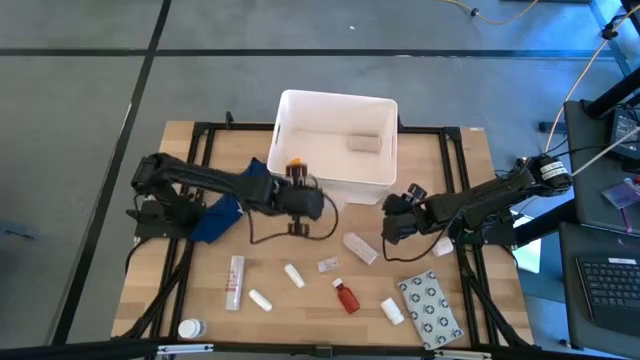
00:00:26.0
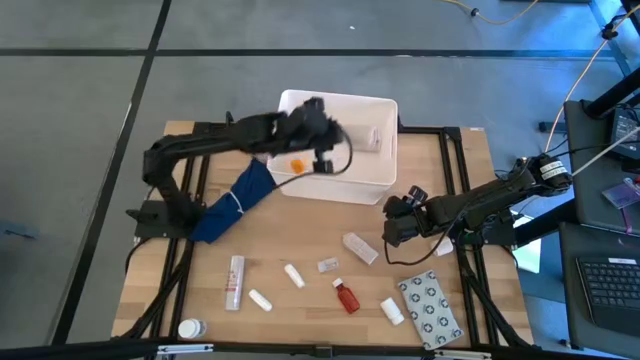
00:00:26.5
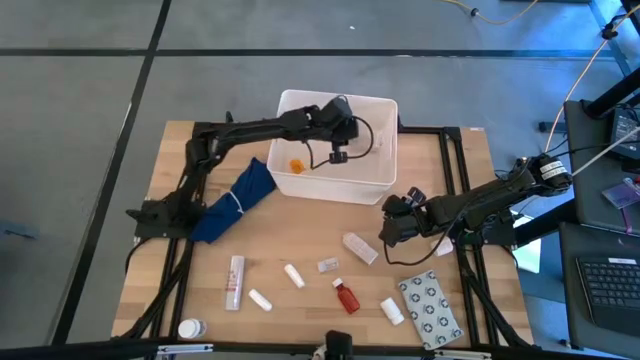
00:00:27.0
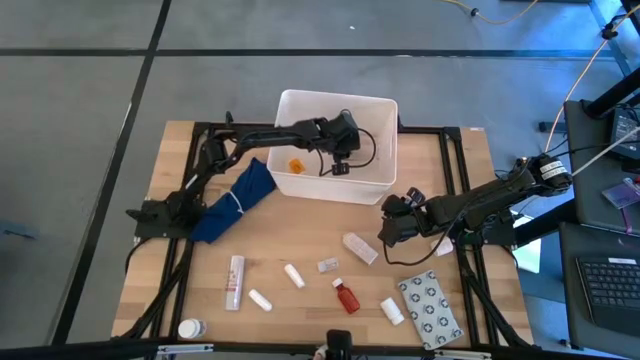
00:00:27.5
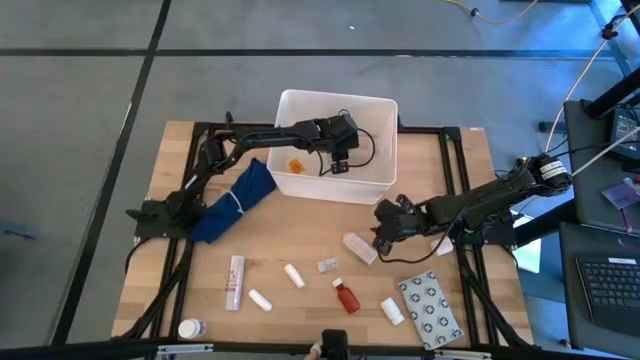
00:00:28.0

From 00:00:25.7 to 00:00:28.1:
Task: Pick & place medical supplies in basket/bin
Put the light brown bandage into the white bin

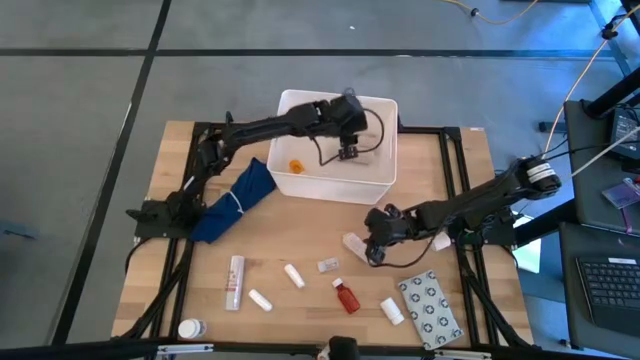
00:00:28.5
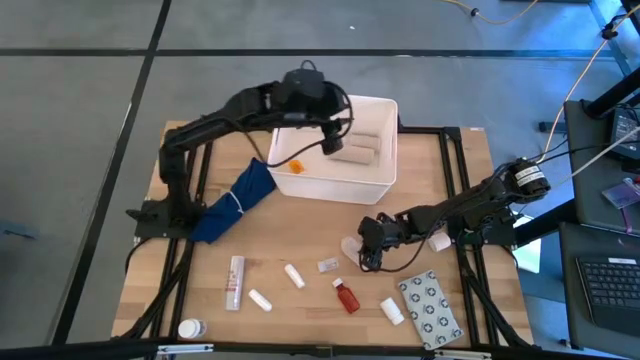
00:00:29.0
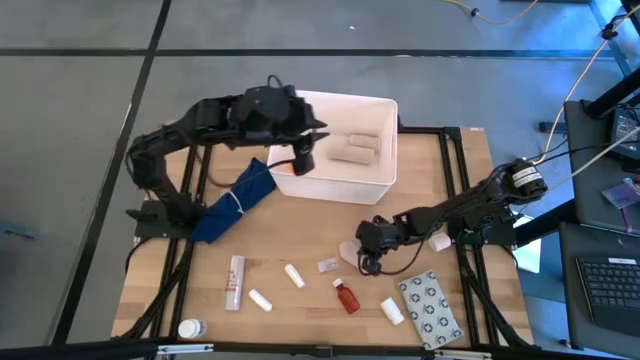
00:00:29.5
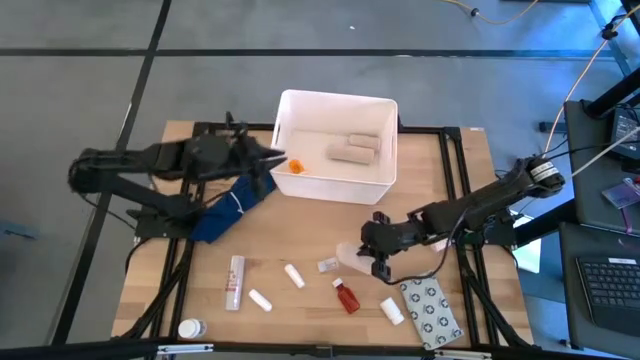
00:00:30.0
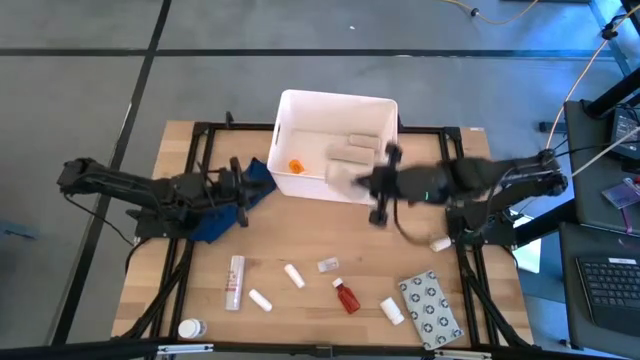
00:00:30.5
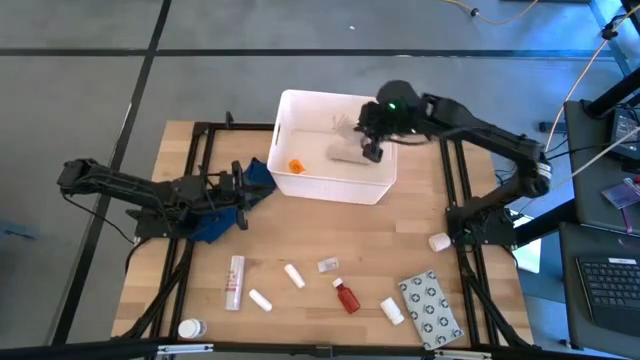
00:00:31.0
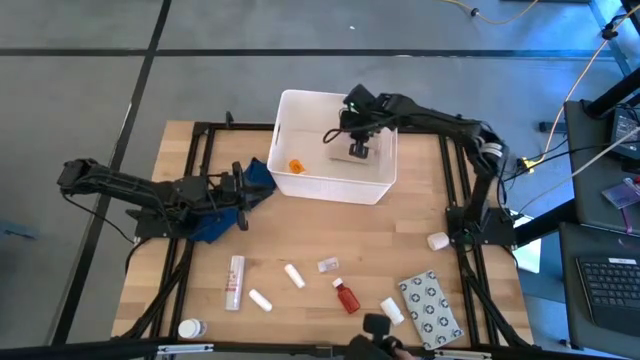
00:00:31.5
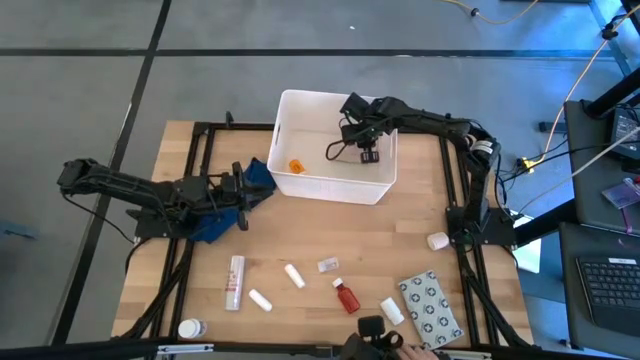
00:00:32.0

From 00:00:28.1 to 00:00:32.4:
Put the light brown bandage into the white bin

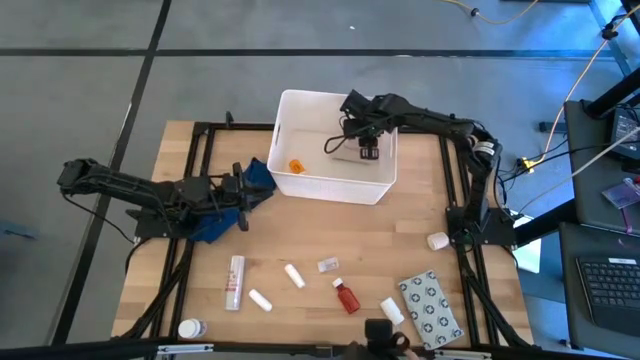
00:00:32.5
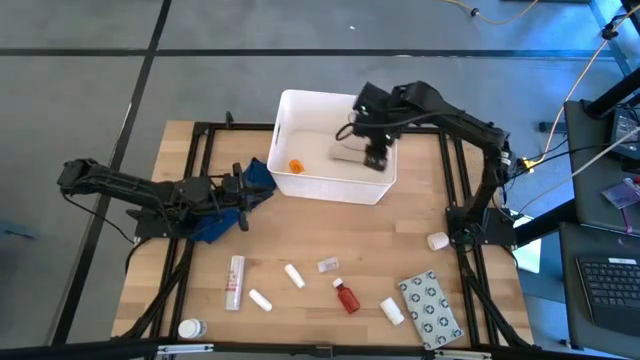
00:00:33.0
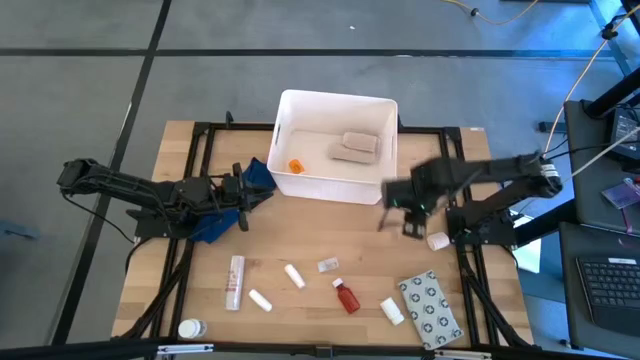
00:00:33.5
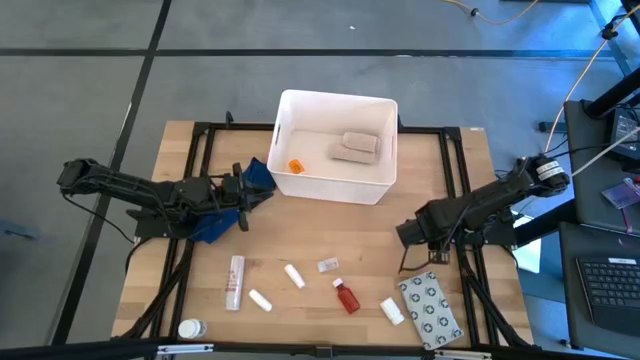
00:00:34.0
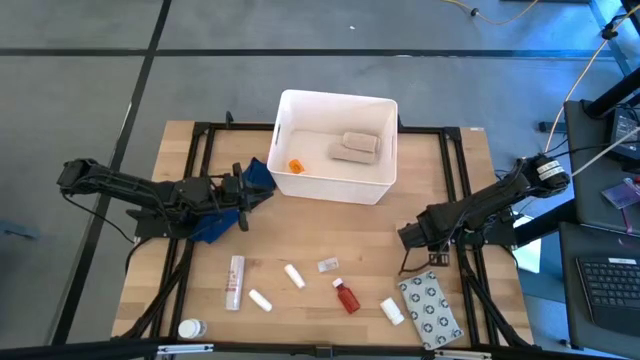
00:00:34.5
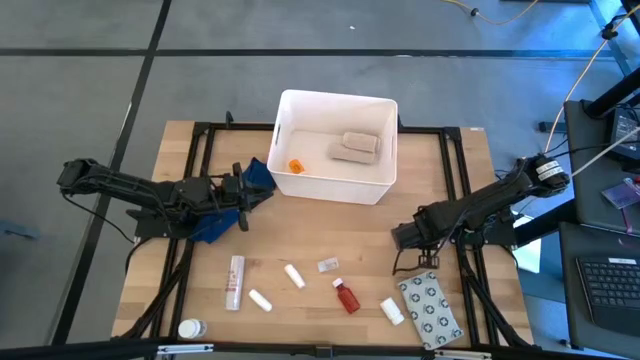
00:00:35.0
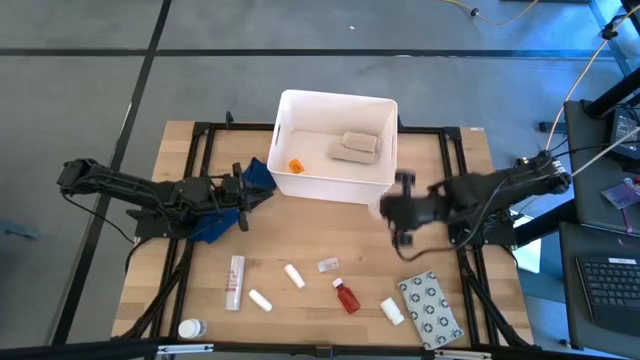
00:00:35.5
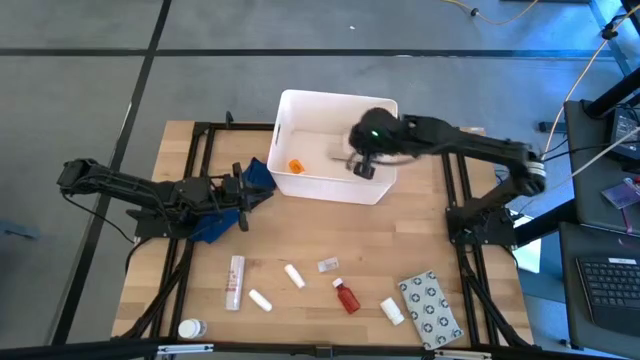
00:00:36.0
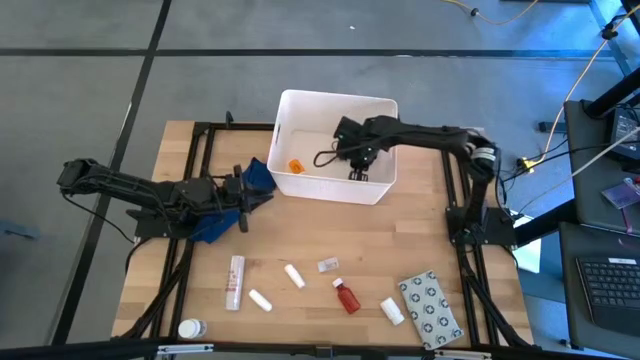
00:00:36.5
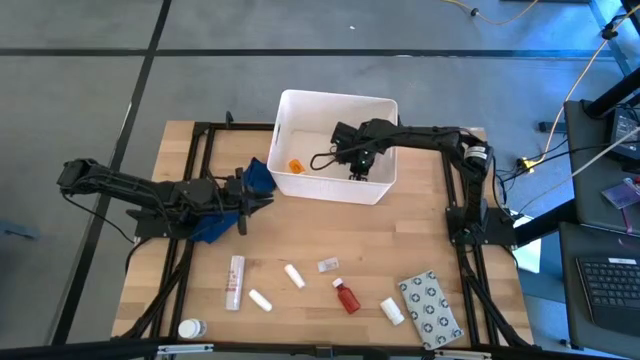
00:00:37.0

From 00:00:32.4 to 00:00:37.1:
Put the light brown bandage into the white bin

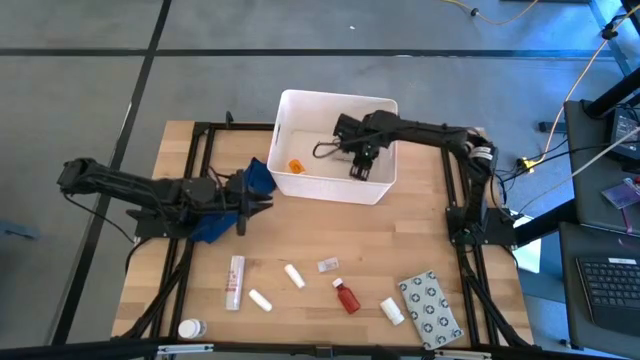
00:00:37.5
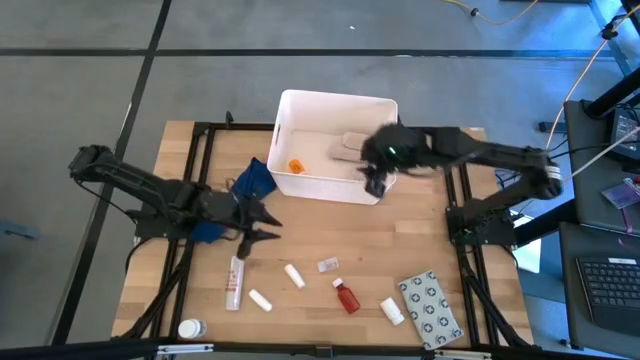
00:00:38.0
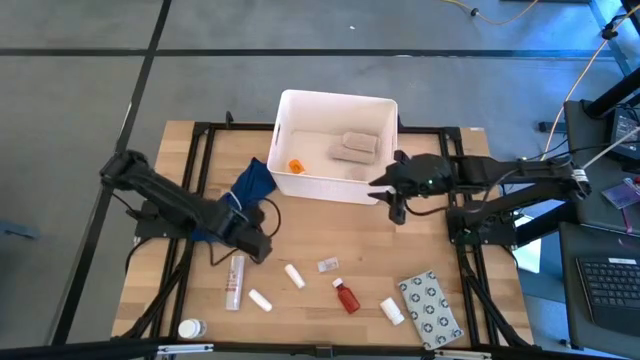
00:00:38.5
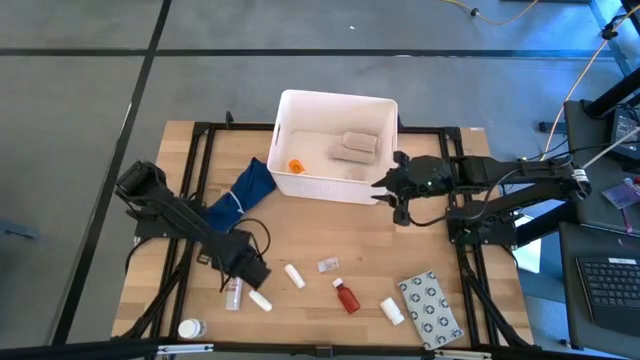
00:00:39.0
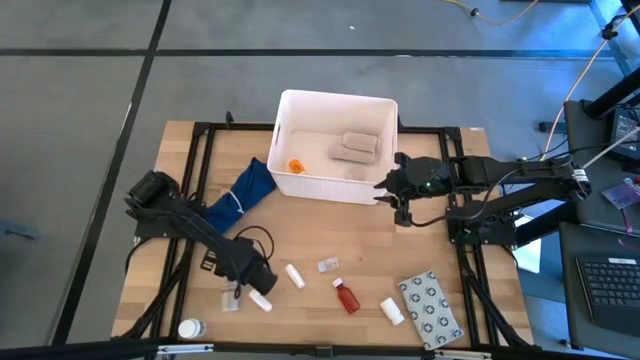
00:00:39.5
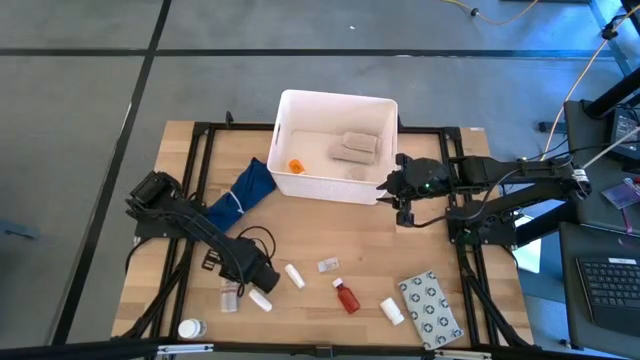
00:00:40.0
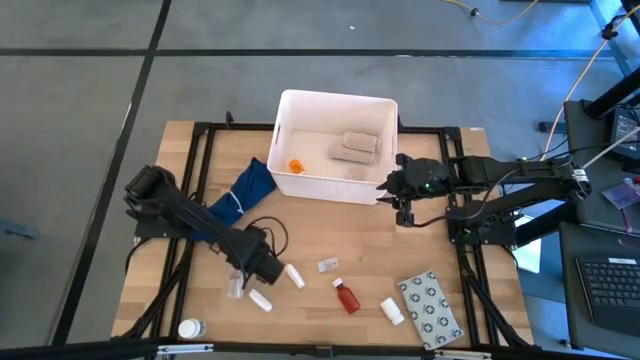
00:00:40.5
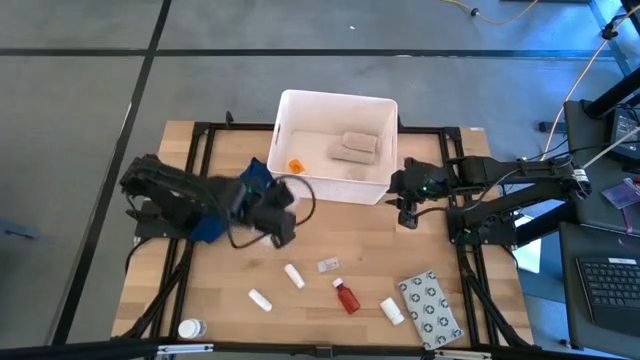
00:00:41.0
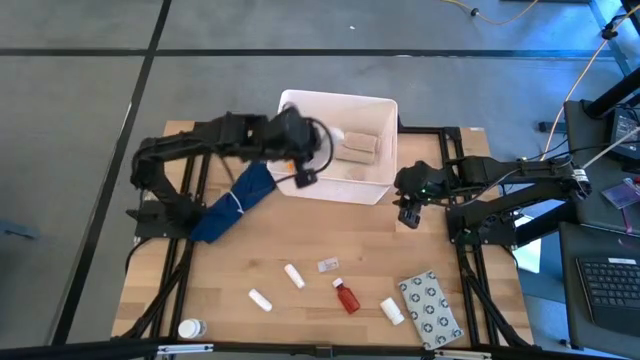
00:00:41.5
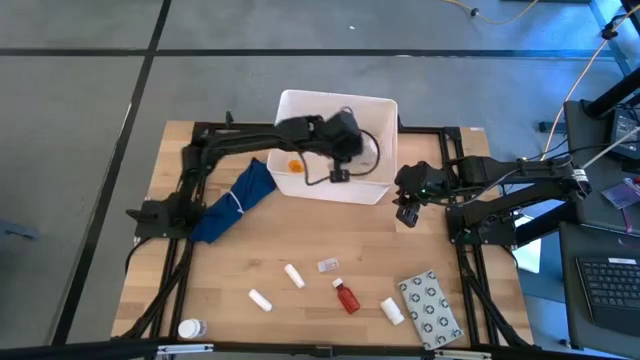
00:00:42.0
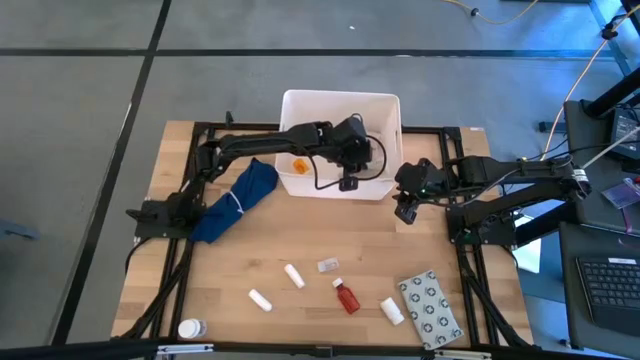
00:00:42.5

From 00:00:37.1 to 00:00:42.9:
Put the light brown bandage into the white bin

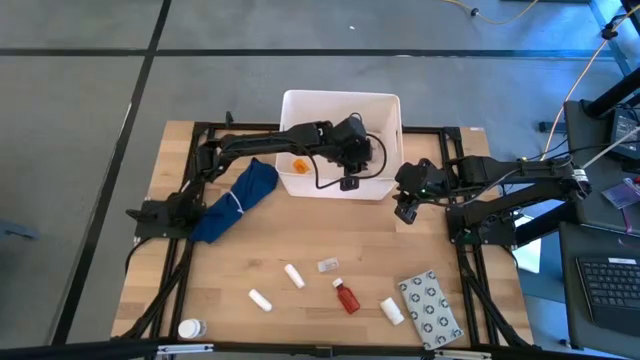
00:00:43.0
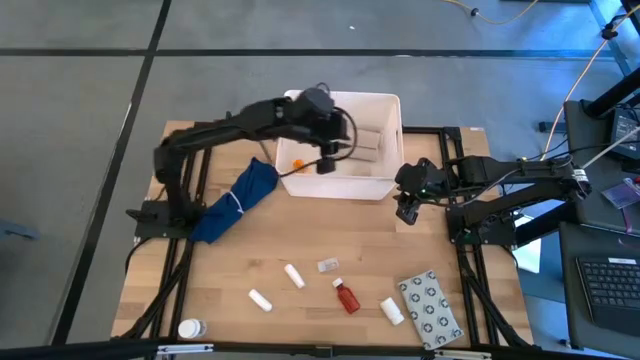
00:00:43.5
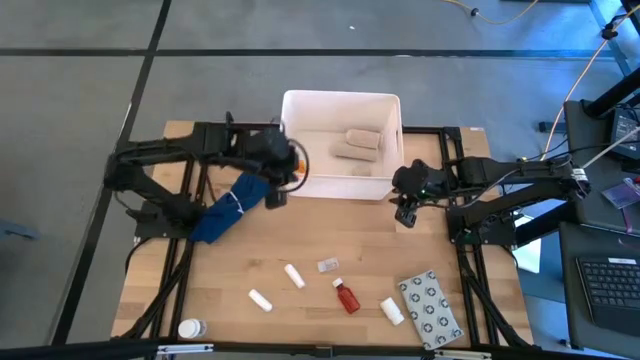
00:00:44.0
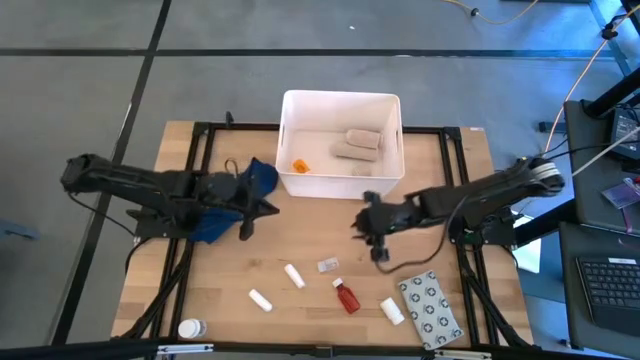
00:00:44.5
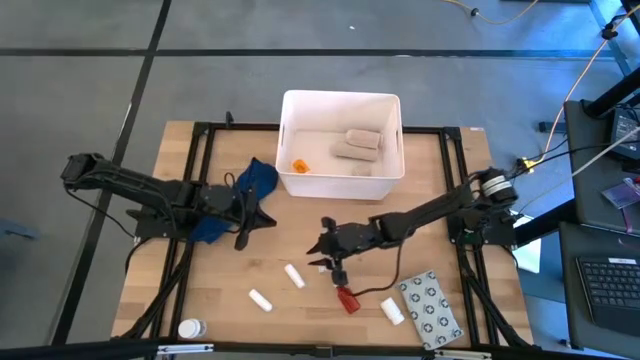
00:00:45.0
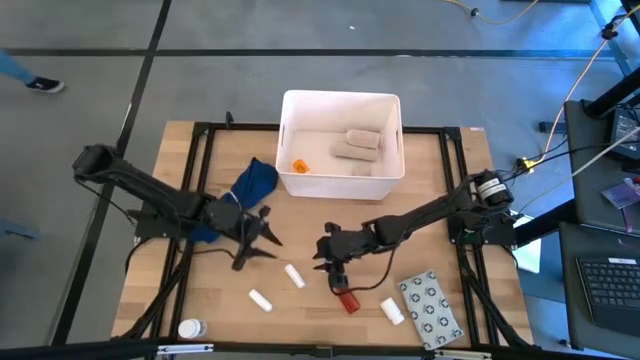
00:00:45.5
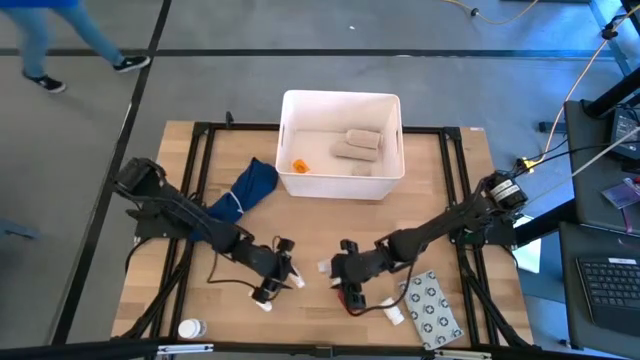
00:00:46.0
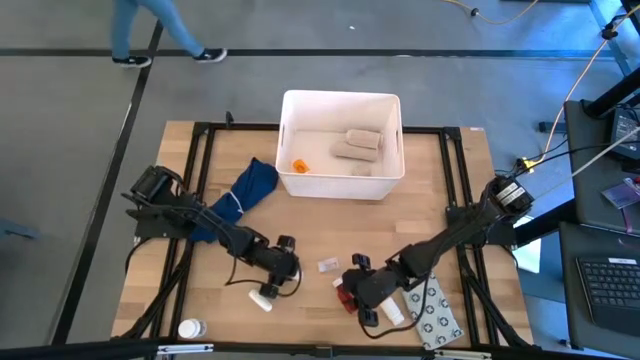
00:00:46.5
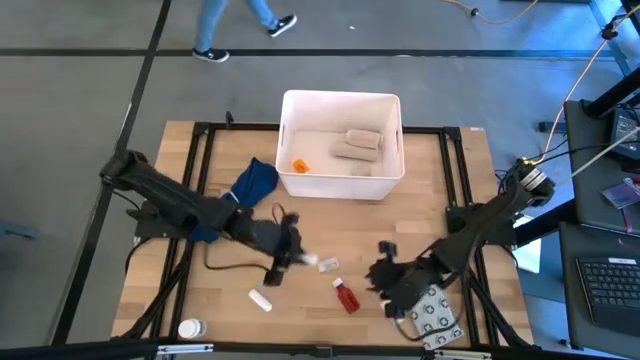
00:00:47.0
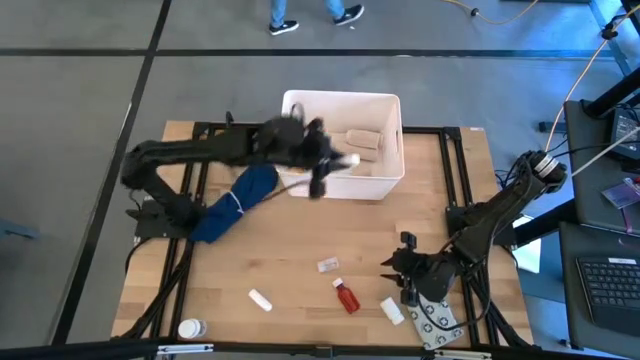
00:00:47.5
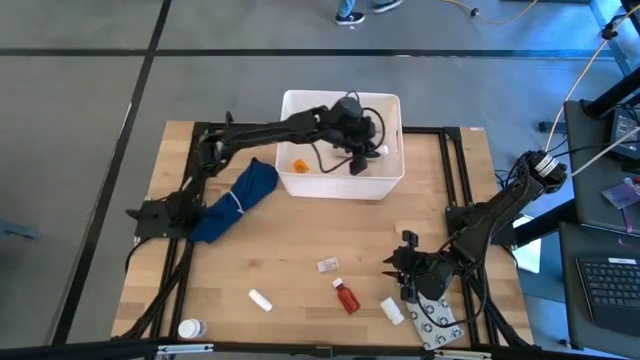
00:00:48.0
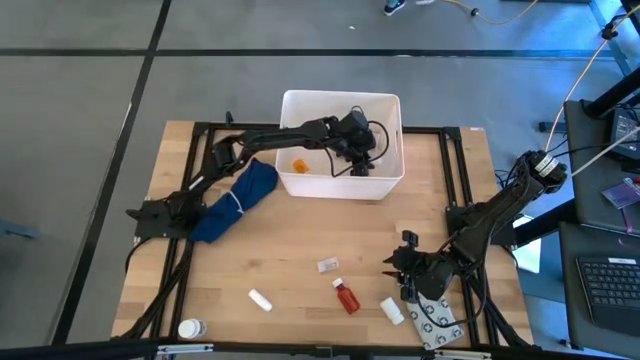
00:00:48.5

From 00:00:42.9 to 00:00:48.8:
Put the white rolled gauze into the white bin
